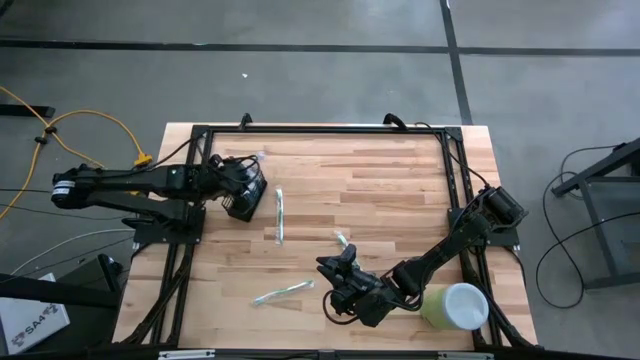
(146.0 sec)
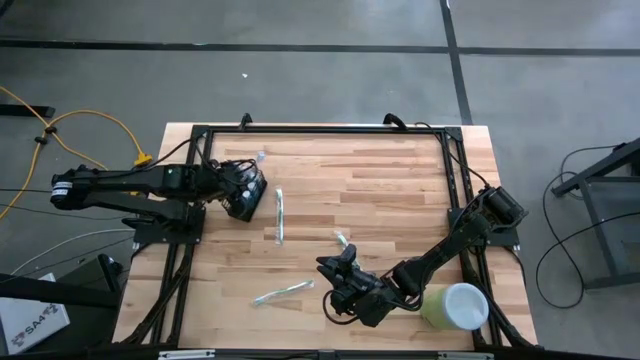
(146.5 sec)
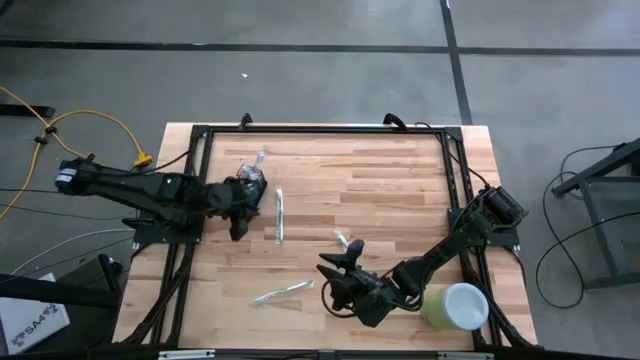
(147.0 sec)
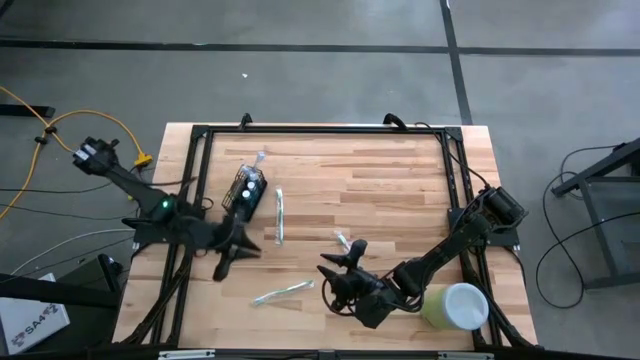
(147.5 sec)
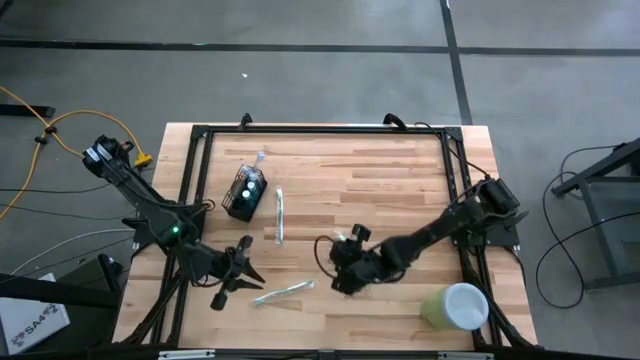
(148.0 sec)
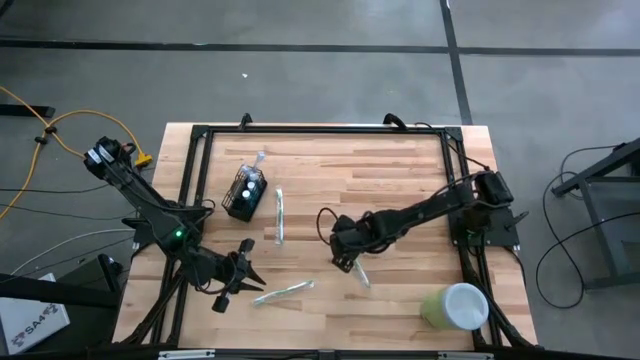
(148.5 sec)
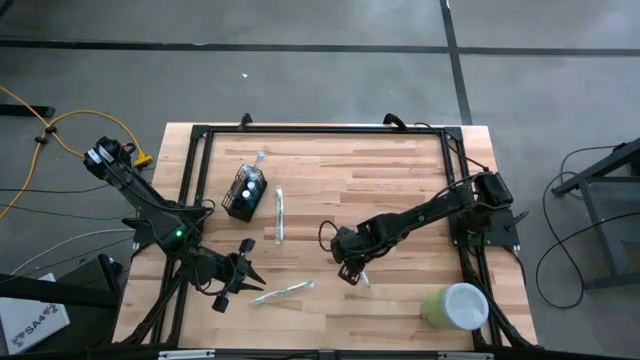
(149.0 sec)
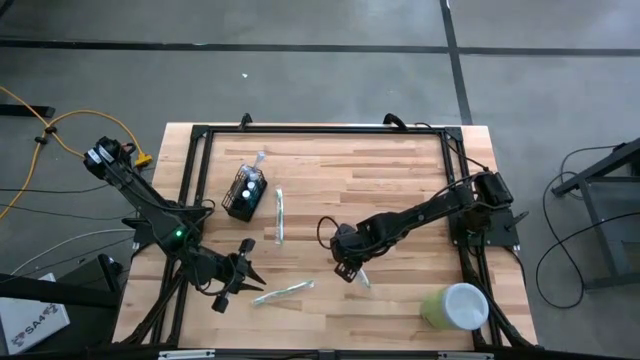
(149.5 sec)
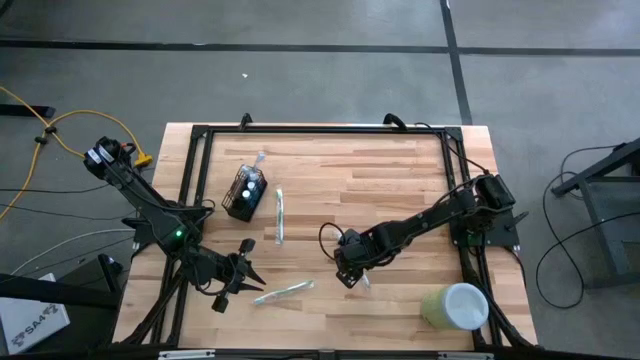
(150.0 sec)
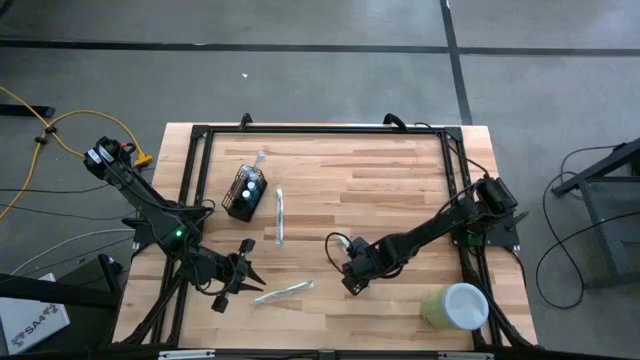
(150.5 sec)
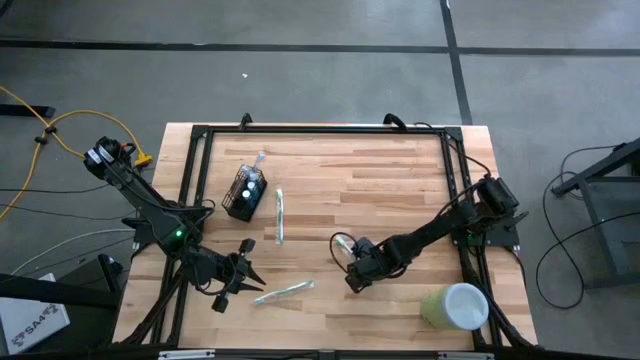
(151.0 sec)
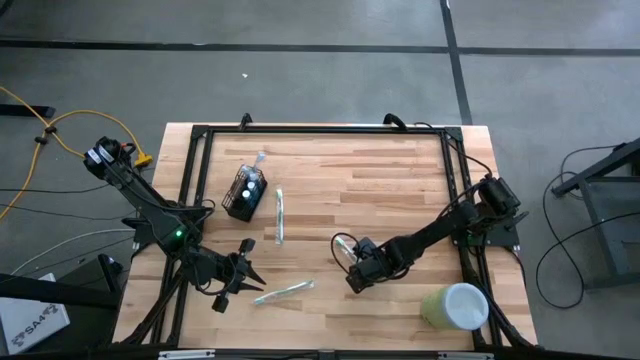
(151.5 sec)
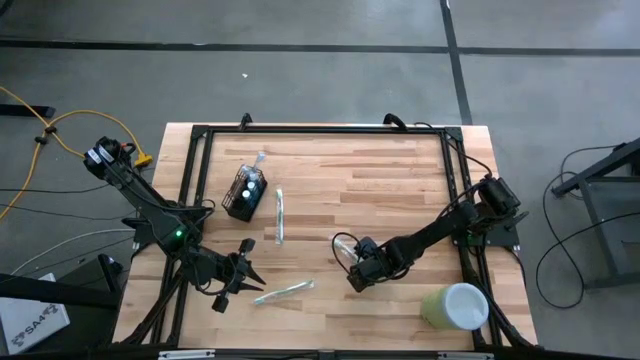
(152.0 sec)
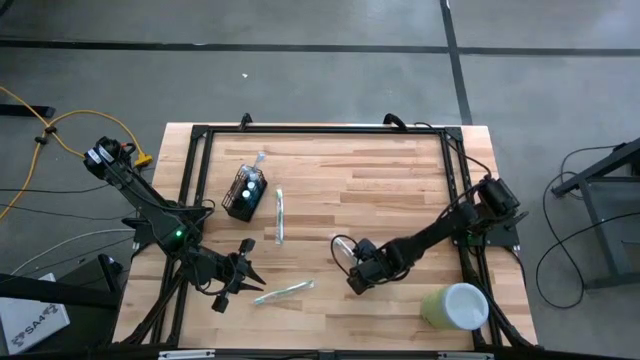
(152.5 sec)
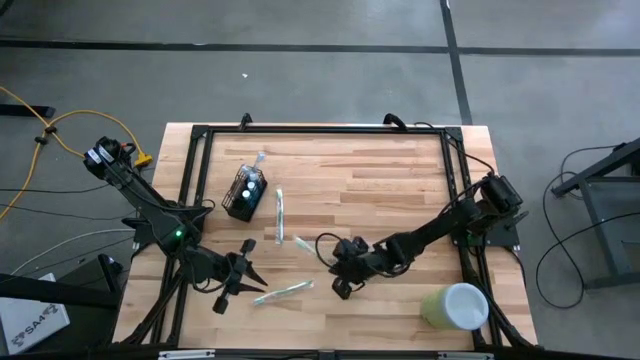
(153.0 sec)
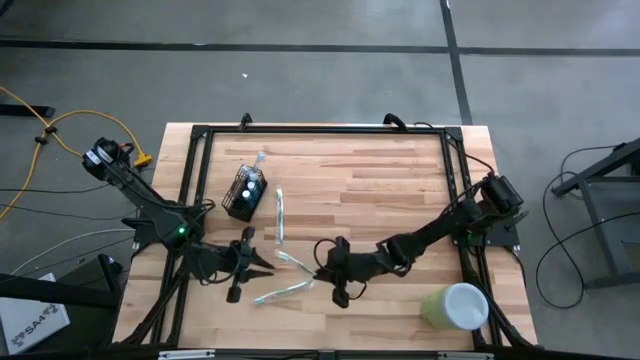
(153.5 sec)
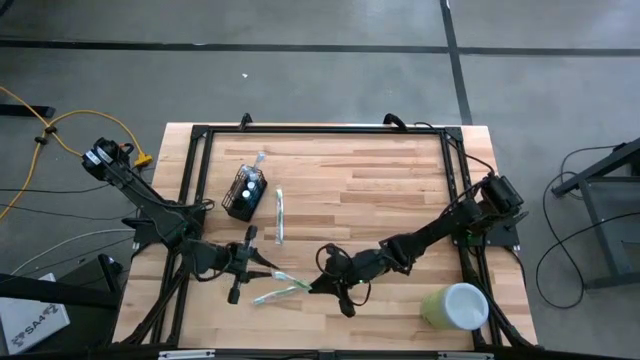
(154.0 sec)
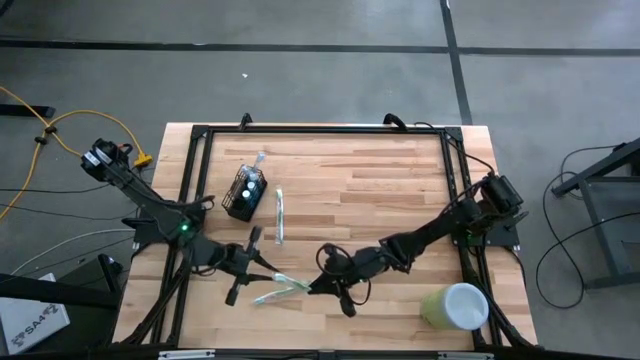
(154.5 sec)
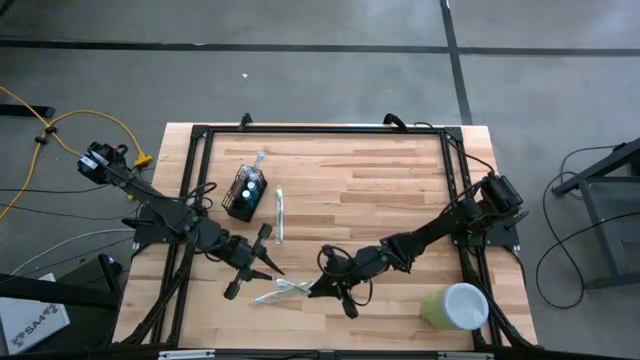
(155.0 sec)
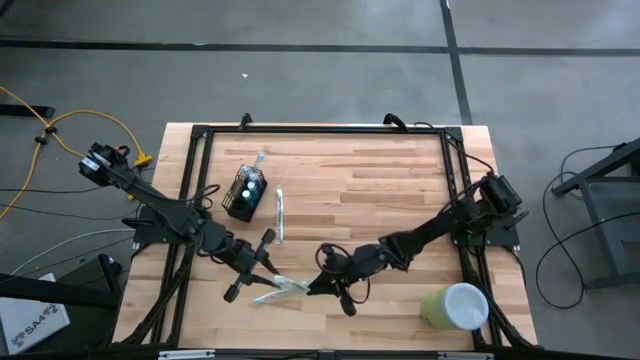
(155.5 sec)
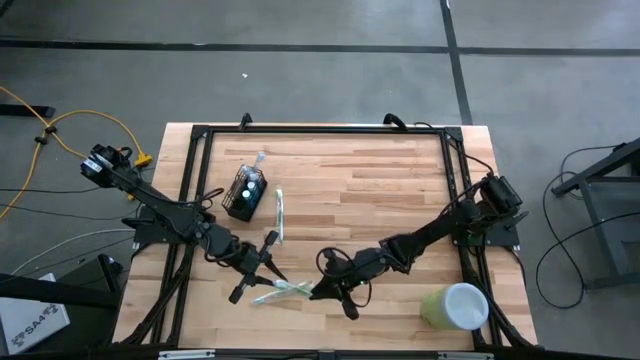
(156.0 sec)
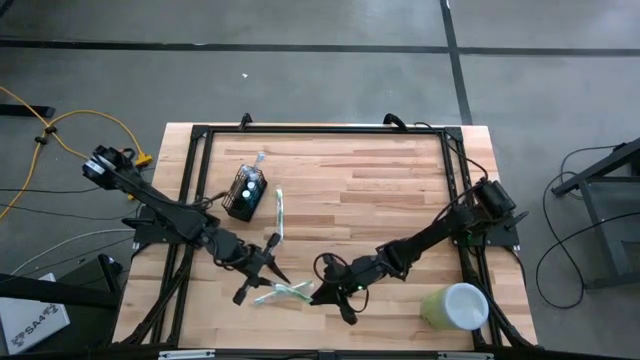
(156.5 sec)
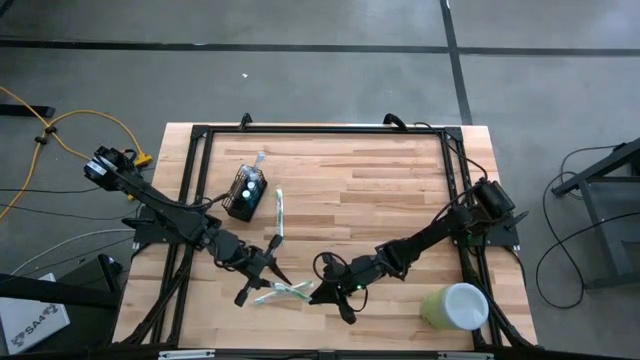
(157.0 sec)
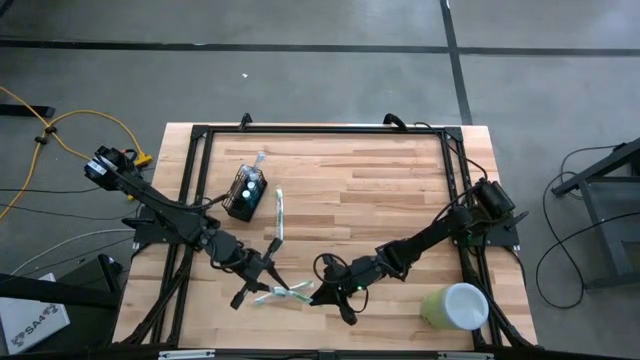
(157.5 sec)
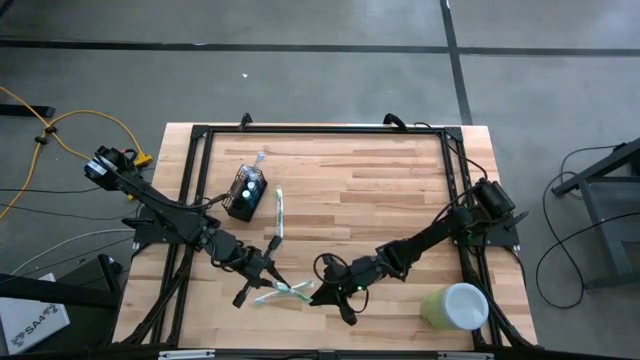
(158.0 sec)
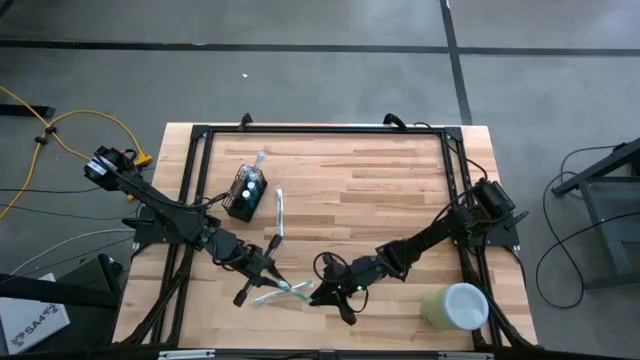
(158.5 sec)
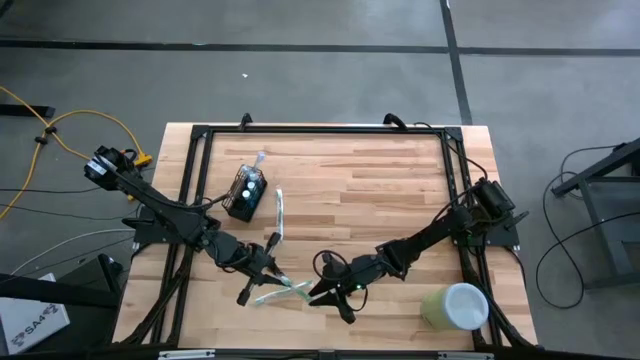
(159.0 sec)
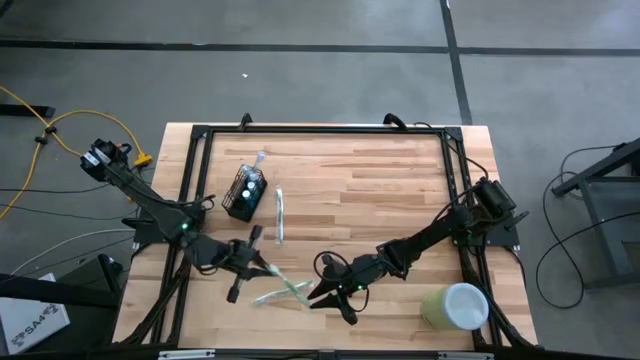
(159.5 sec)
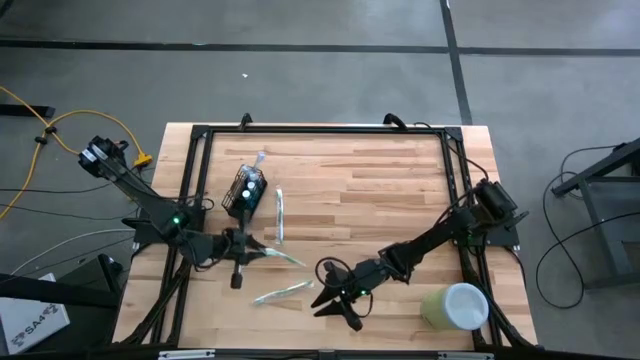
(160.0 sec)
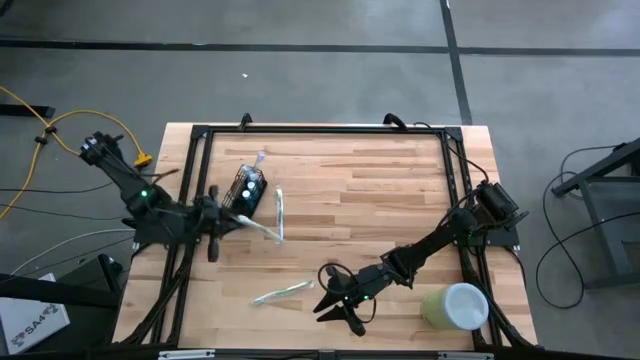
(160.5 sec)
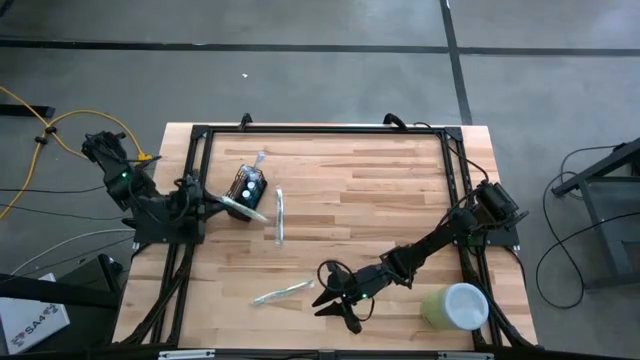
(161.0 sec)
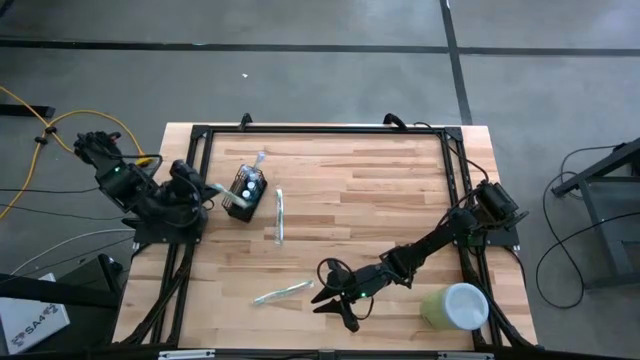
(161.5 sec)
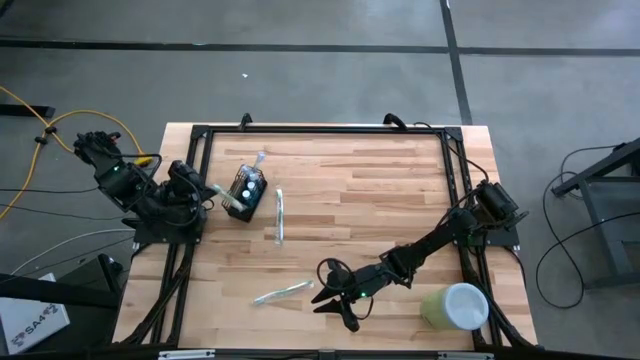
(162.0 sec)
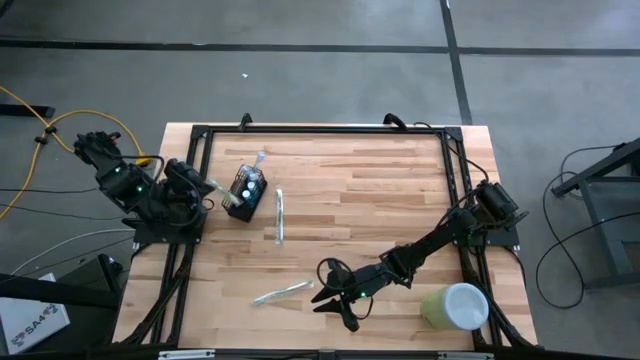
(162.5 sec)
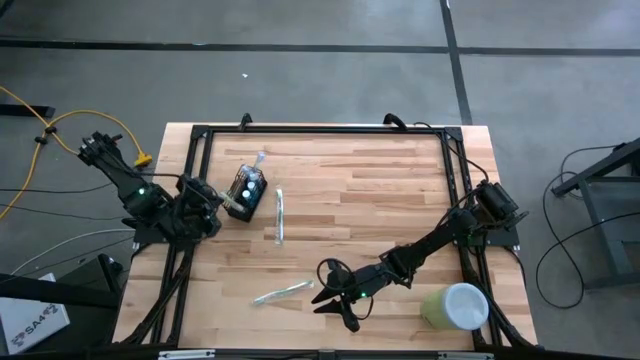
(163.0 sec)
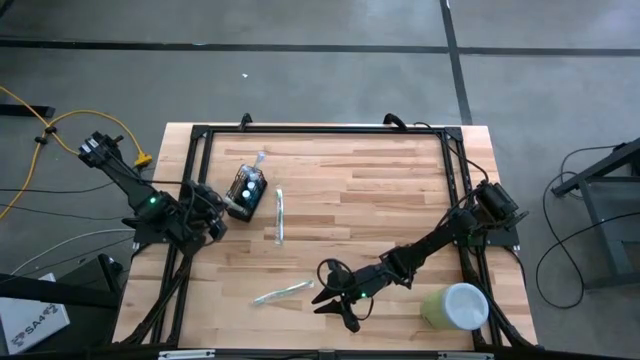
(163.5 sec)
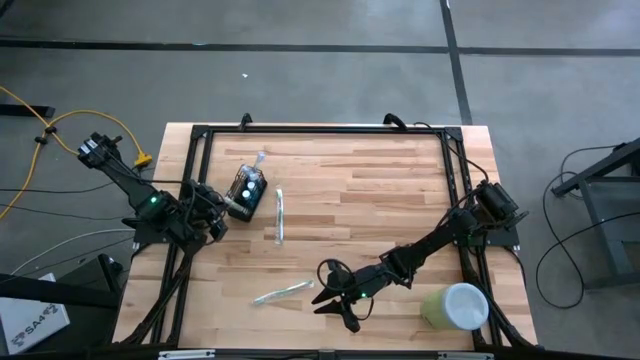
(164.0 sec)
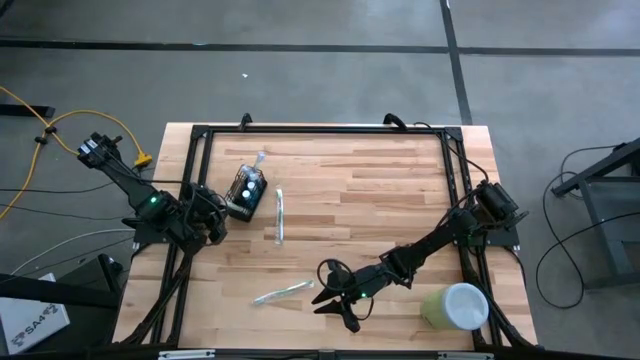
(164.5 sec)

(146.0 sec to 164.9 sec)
Task: Pick & Place toothbrushing station
Put the middle green toothbrush into the black wire organizer

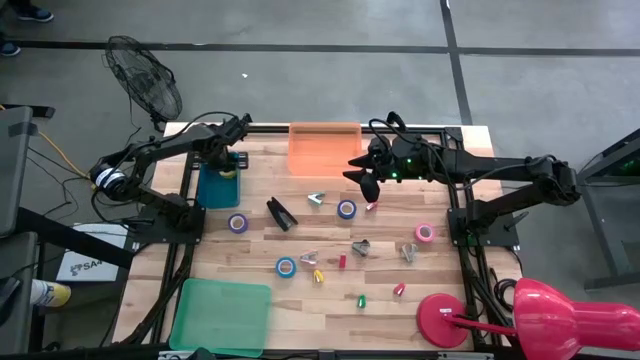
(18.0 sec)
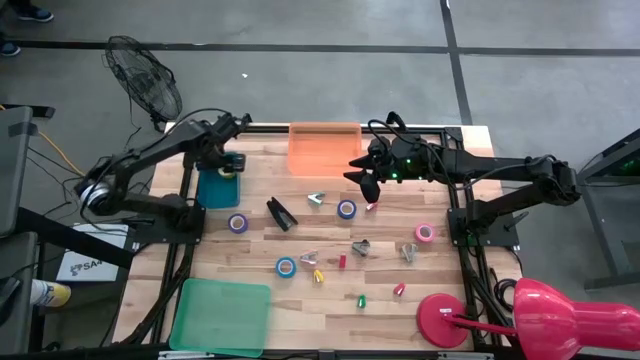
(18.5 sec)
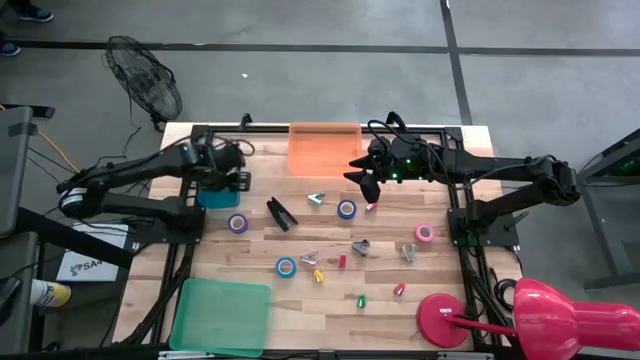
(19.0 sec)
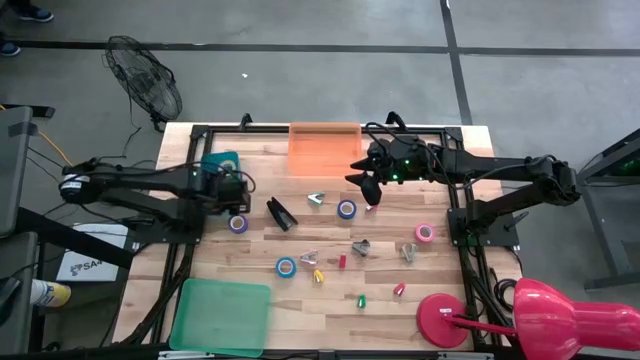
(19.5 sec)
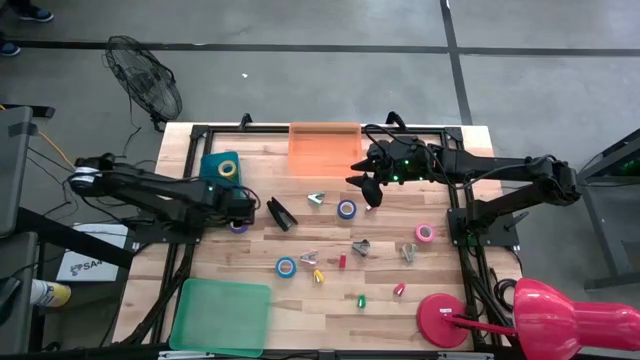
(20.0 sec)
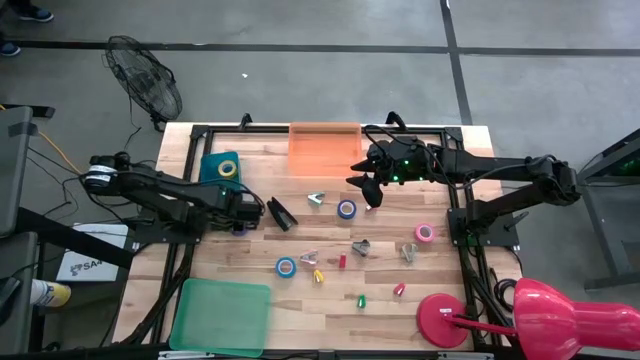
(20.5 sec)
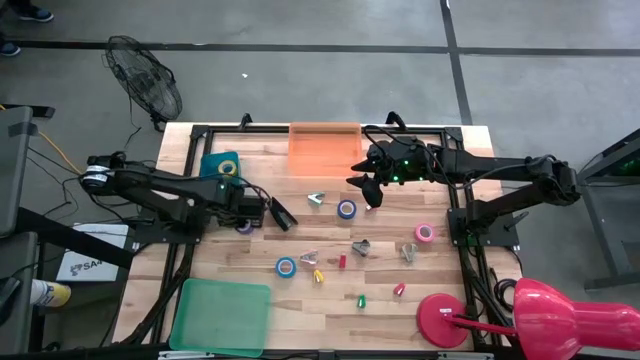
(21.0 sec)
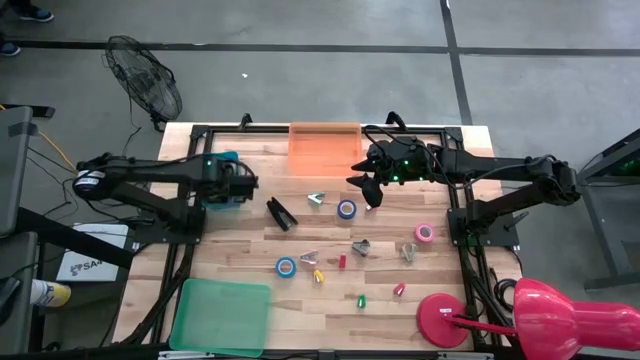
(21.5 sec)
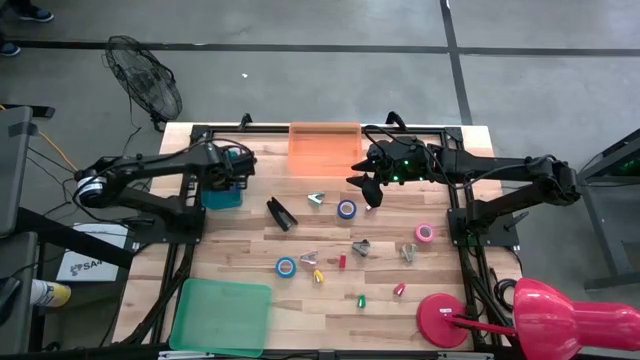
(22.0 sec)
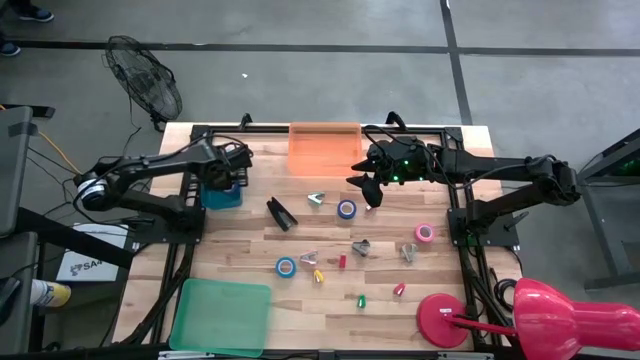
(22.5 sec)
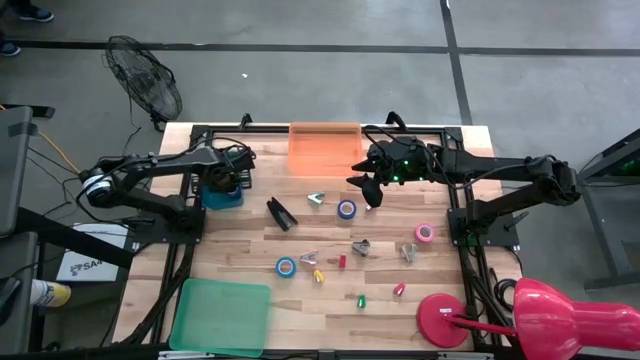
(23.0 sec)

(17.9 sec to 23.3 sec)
Task: Pick and place Stapler, Stapler remover, tape
Put the blue tape into the blue bin
